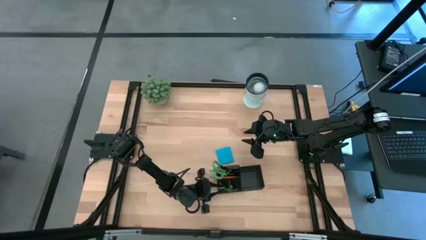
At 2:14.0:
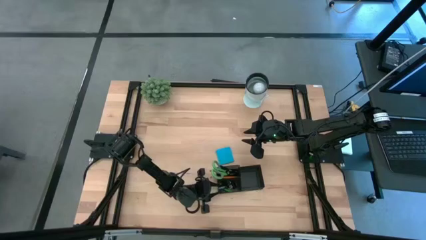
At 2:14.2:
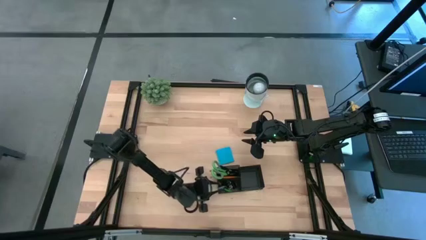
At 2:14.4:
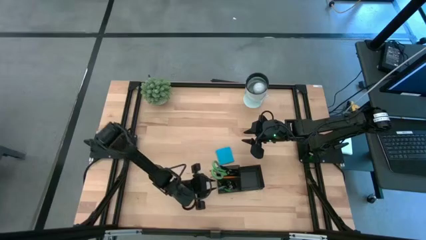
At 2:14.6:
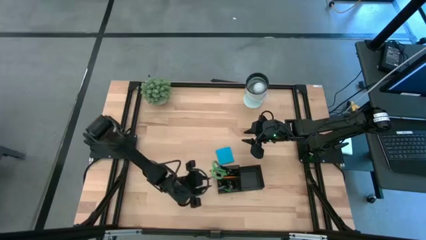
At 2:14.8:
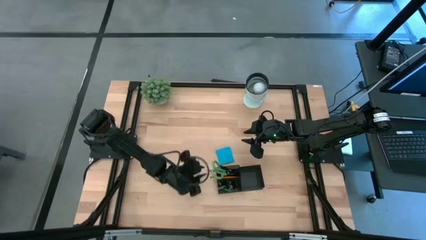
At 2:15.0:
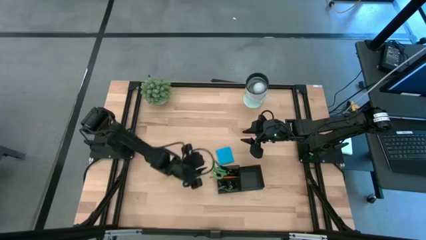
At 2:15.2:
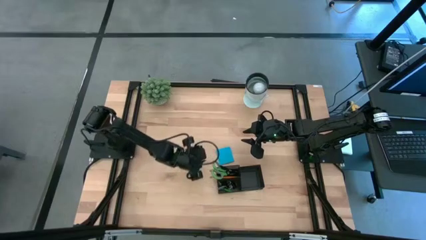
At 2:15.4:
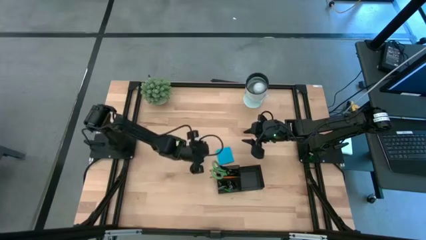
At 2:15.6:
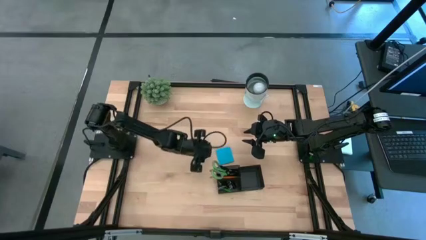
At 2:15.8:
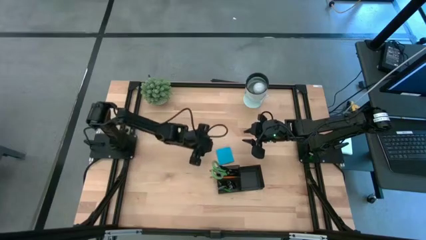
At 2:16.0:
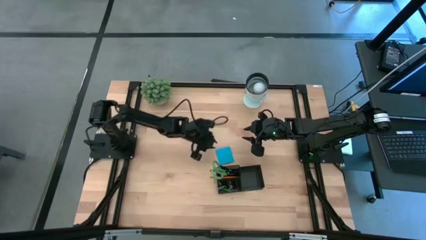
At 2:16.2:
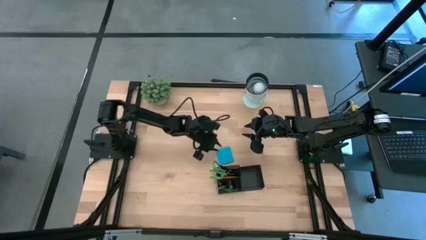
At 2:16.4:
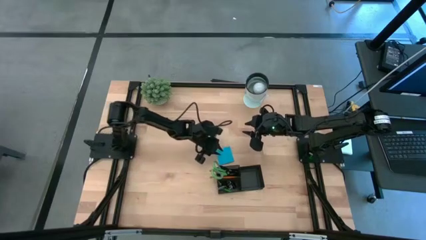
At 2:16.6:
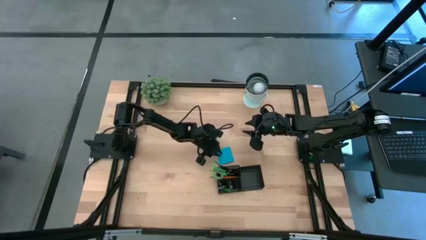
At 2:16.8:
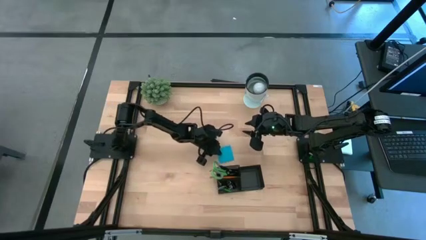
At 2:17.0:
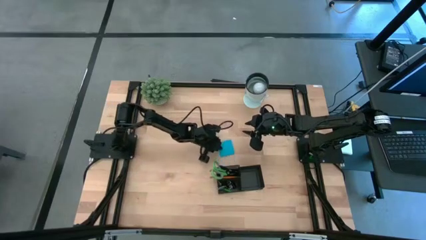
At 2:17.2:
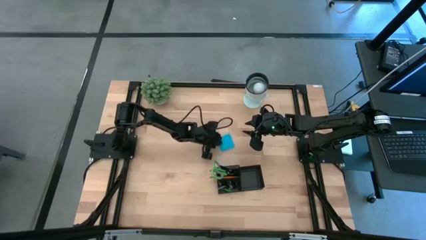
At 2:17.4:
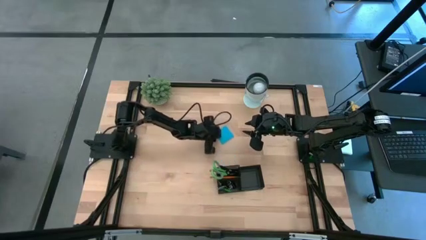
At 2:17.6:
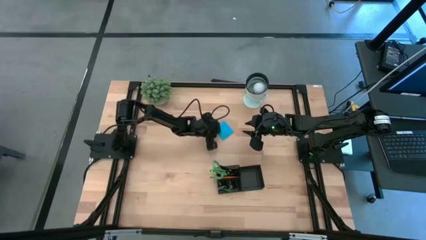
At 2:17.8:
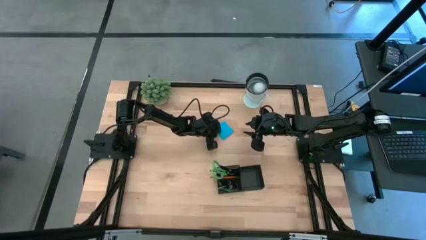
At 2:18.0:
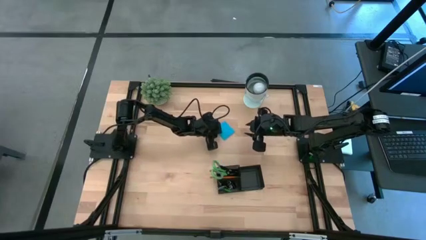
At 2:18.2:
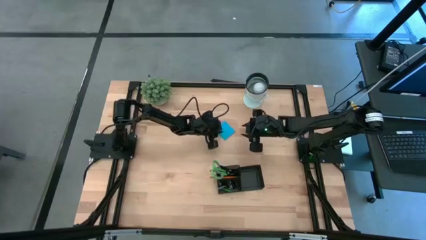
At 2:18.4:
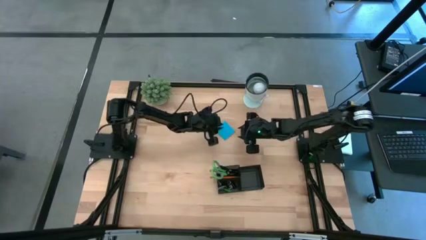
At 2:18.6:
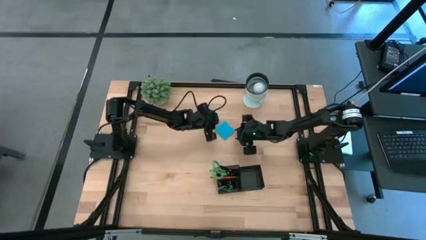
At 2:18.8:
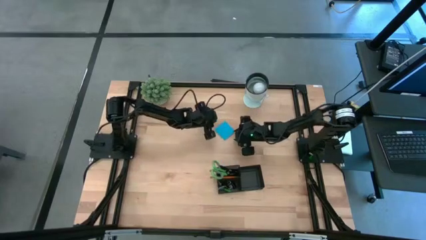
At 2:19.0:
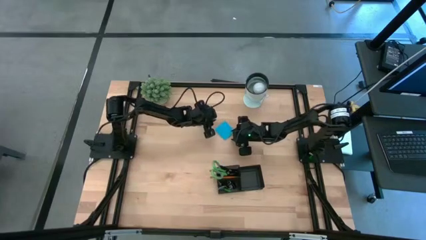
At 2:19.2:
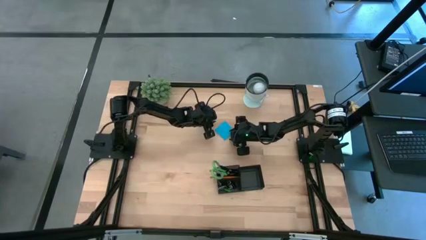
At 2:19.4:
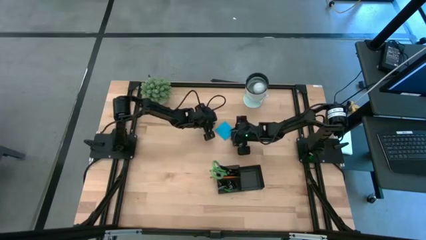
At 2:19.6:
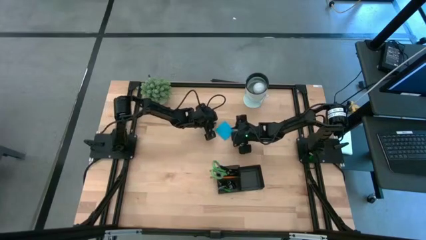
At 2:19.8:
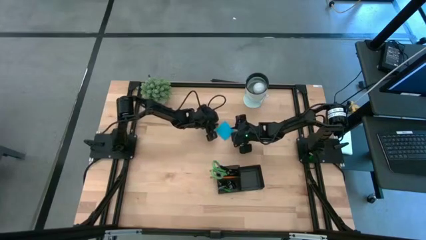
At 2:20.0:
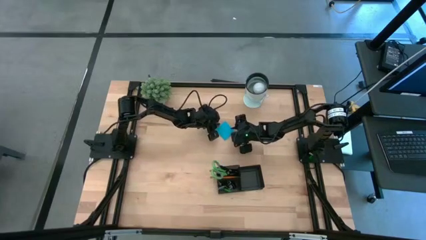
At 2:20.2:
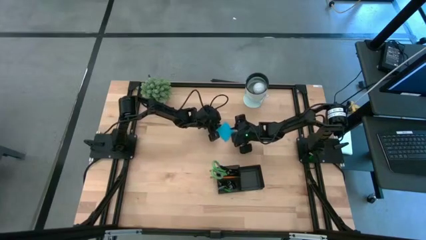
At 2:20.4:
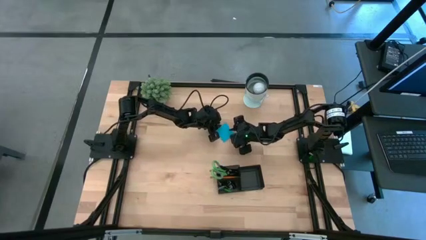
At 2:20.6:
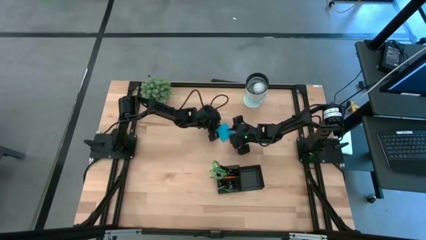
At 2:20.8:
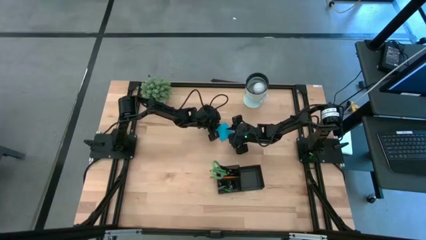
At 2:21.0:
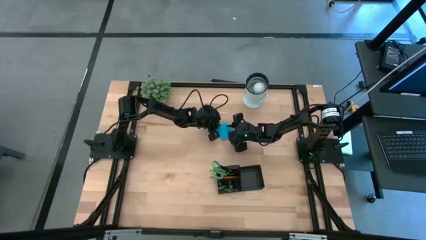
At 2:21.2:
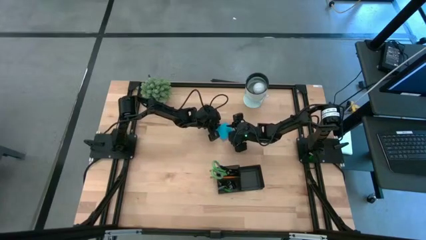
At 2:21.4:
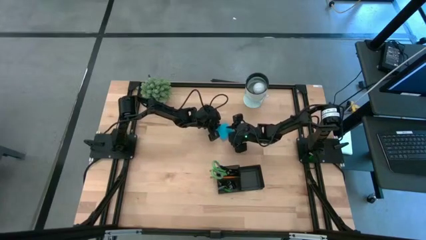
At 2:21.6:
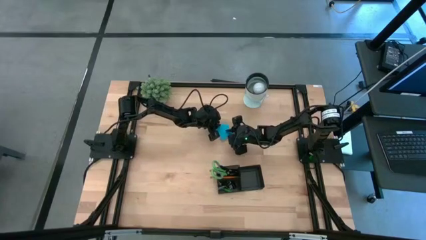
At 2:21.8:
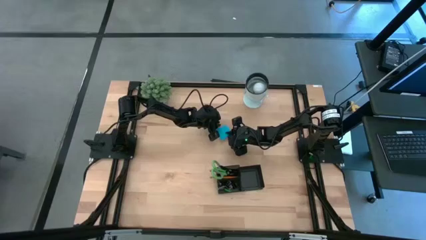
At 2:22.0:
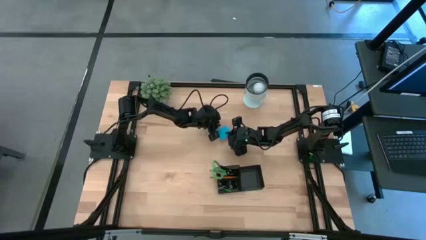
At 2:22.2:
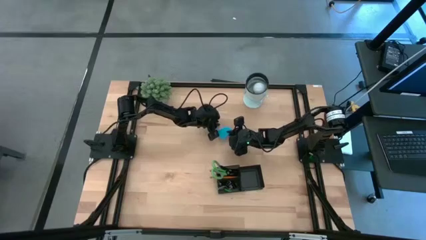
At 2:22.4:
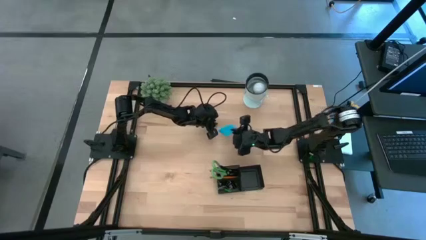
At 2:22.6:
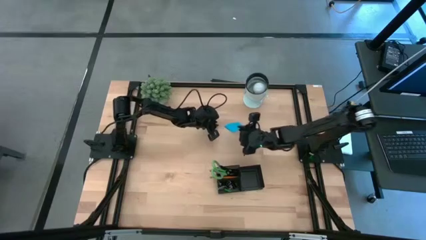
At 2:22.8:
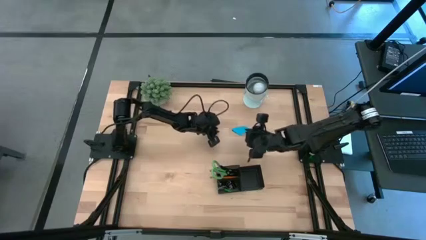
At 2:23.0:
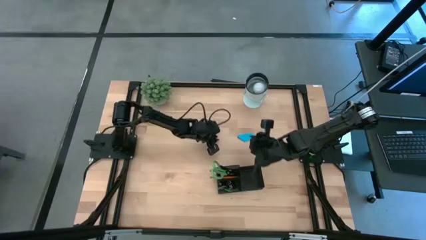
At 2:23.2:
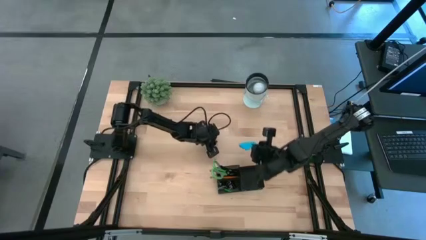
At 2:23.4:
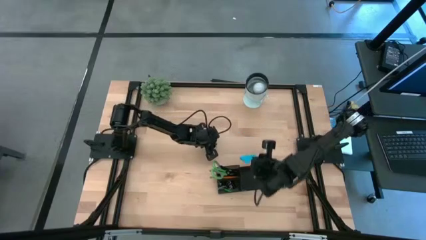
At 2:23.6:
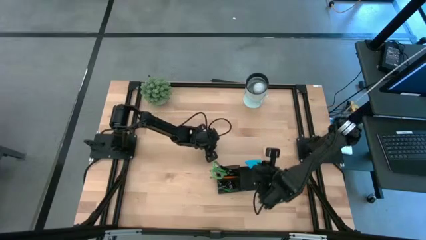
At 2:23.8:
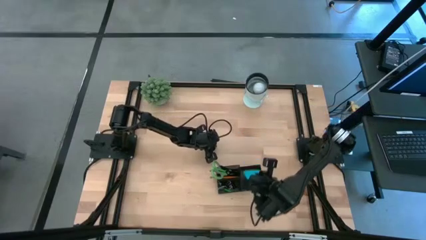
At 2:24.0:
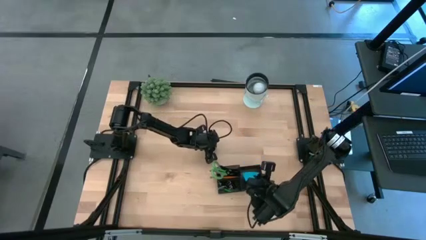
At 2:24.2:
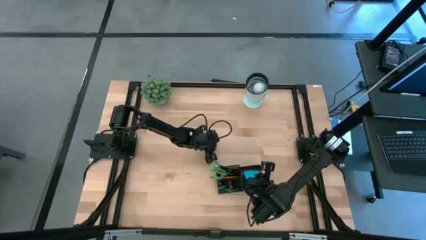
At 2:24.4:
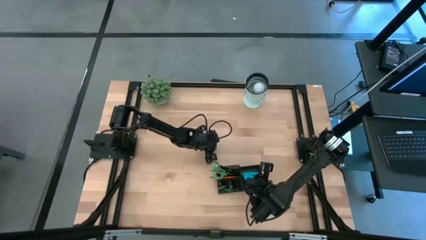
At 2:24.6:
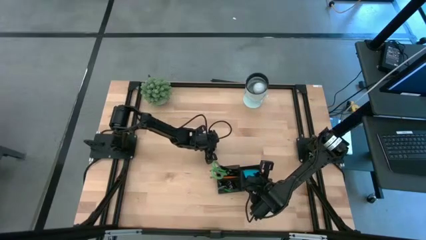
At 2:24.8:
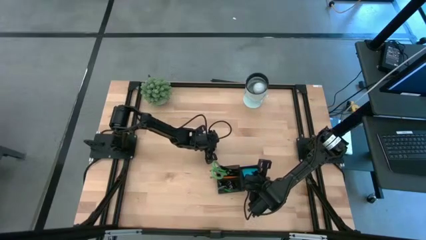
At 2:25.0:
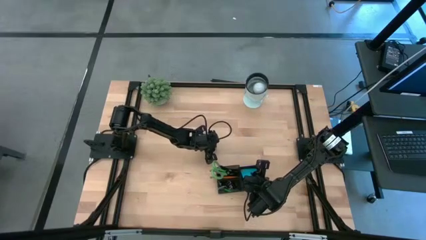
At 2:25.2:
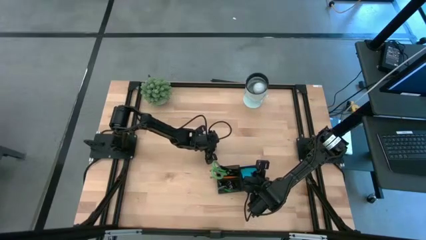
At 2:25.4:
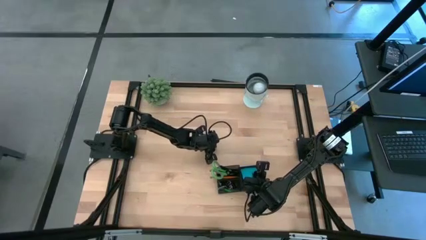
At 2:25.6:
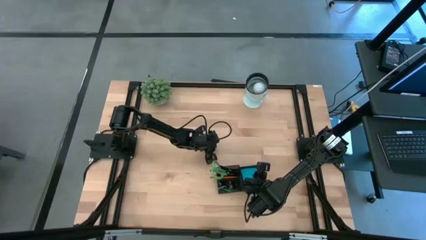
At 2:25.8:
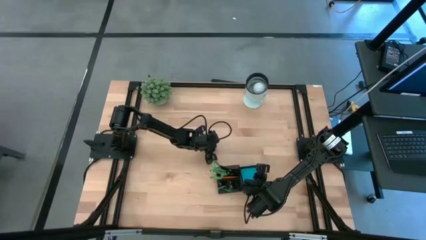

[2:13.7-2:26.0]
Task: Pick and place office supplies into organizer
Put the sticky note into the right slot of the desk organizer

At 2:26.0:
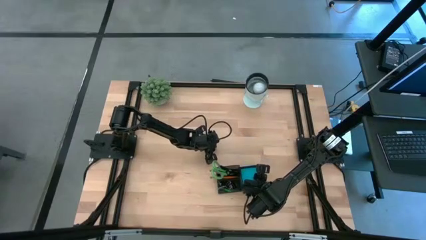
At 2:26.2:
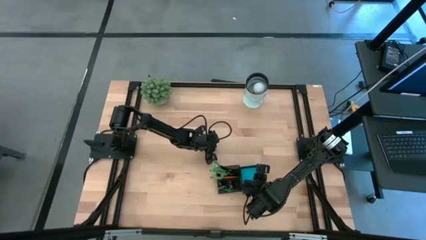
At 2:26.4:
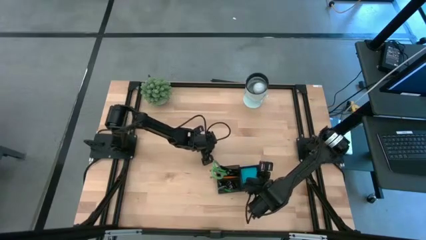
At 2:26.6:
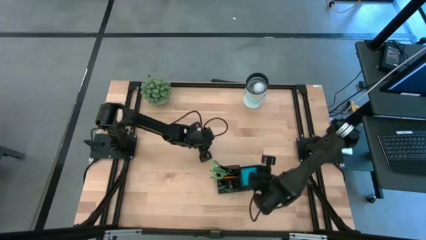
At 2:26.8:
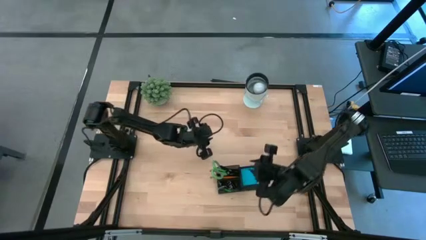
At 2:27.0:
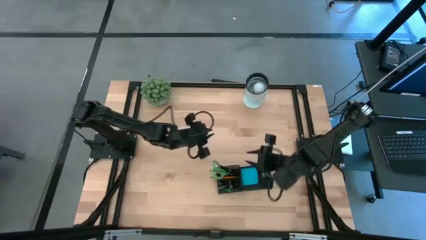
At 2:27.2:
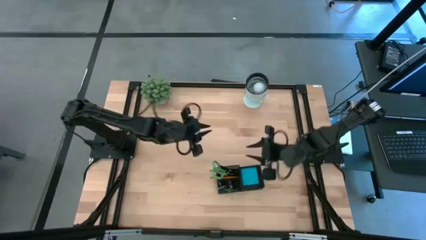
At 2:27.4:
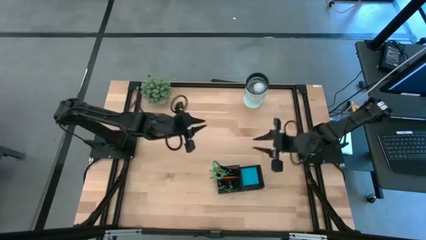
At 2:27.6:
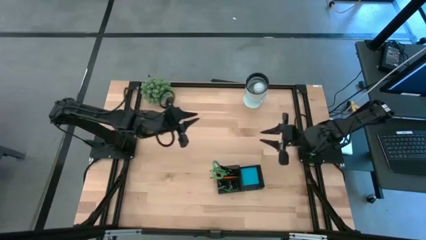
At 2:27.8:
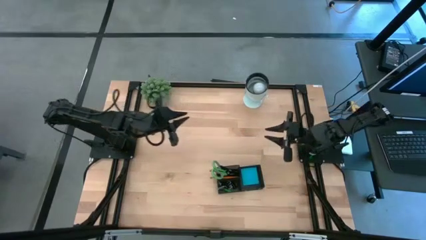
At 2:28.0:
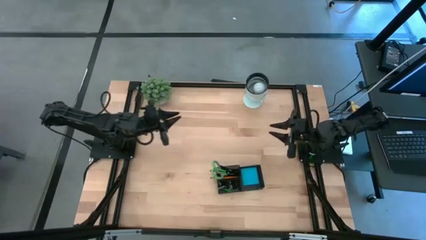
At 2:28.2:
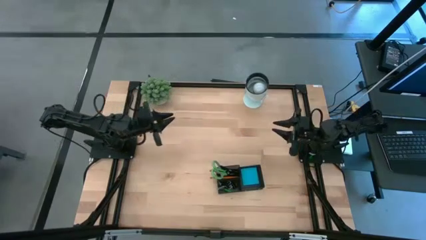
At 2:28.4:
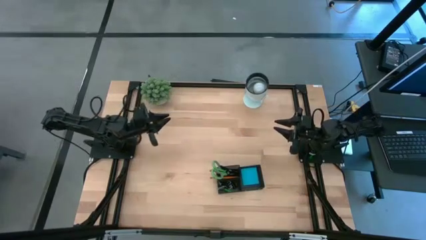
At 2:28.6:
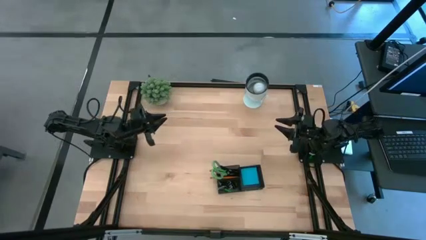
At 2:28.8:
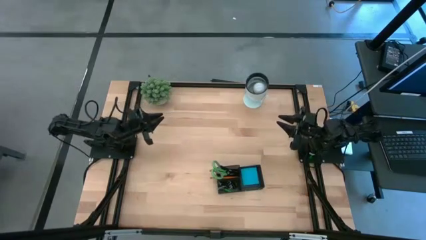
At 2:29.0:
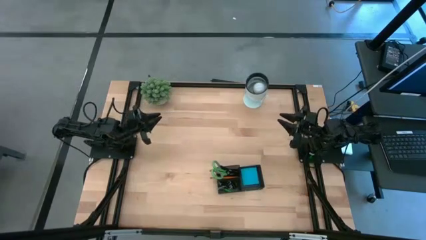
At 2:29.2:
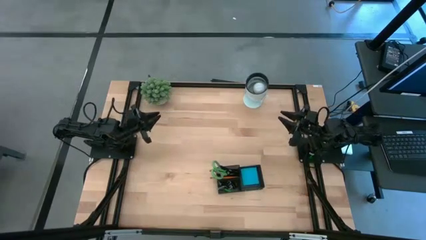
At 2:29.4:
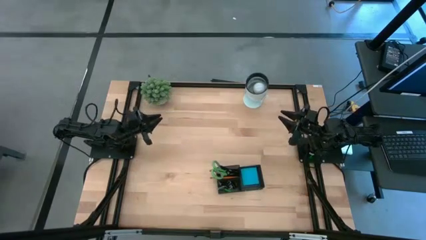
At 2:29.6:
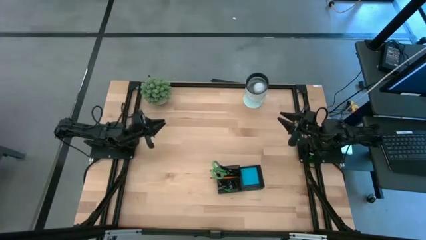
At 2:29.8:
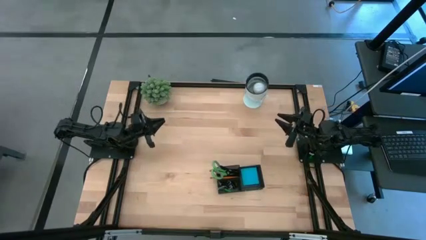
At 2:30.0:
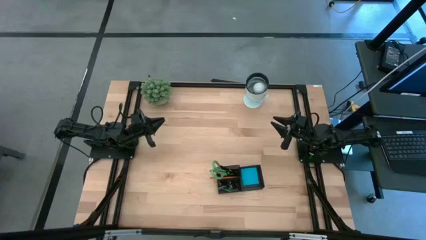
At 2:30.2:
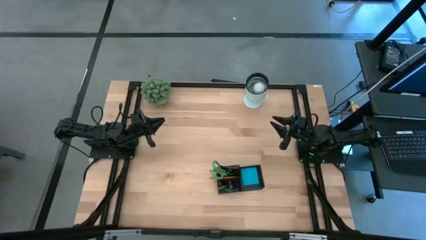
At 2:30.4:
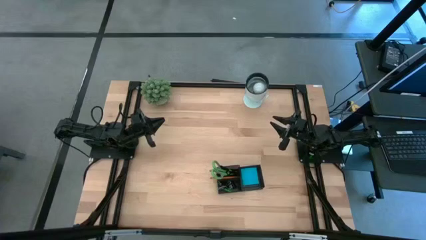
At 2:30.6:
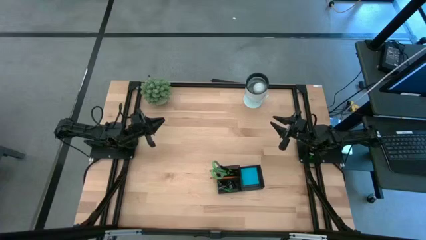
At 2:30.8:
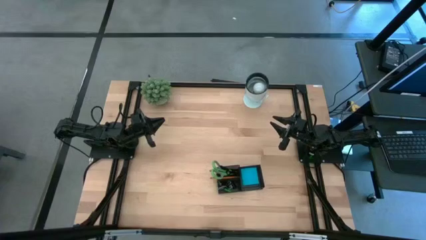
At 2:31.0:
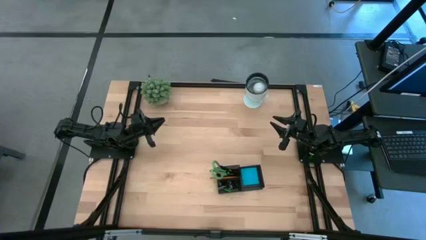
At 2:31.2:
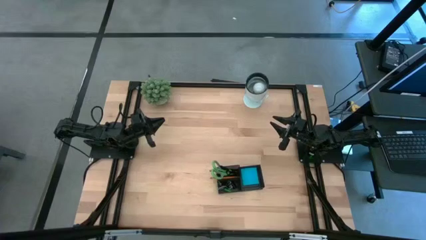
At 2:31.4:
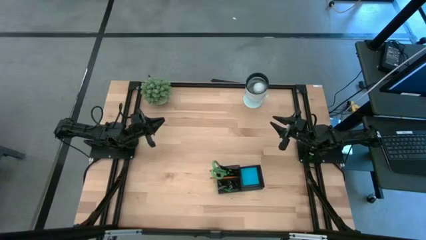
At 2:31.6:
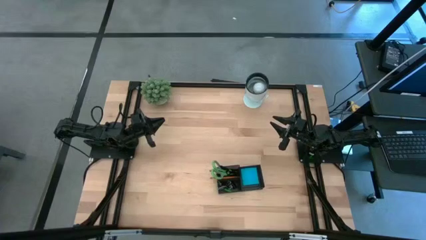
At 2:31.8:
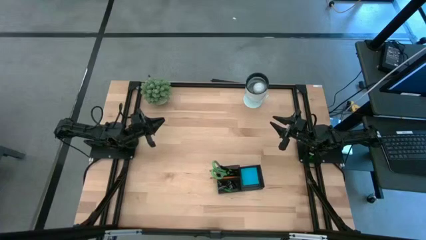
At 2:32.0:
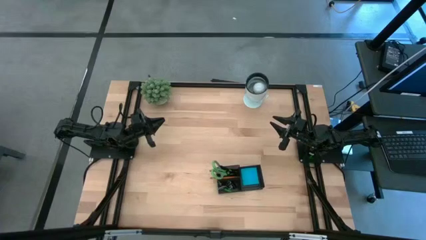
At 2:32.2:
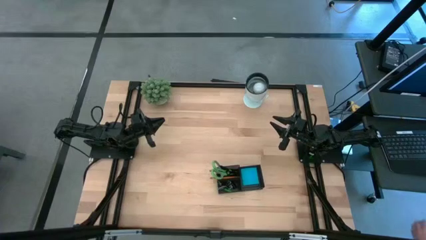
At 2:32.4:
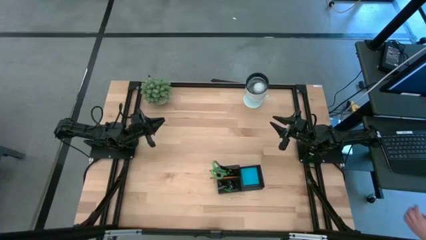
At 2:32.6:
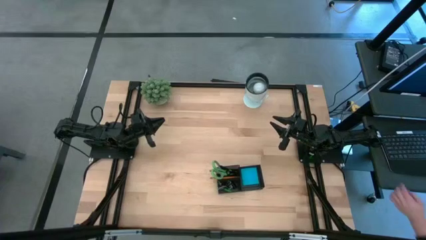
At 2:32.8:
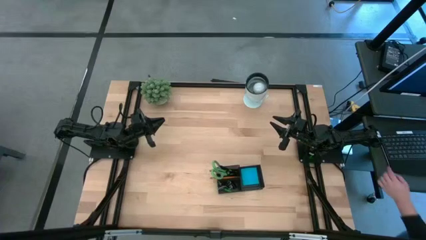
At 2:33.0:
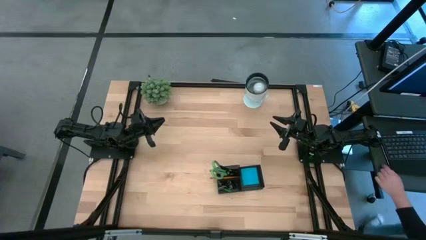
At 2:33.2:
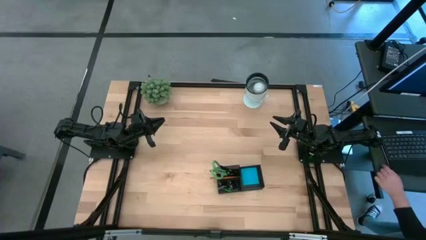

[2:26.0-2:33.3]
Return to Home Position
